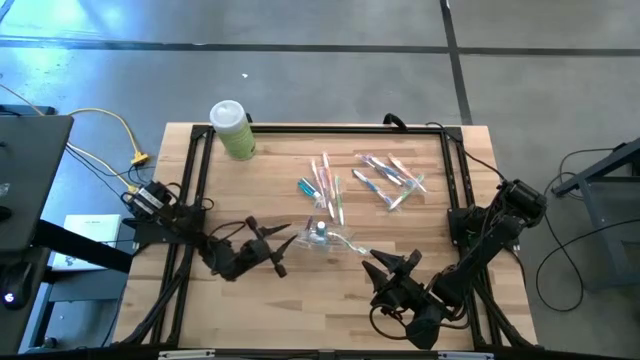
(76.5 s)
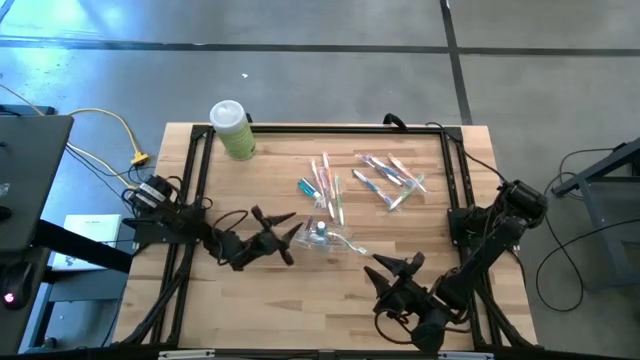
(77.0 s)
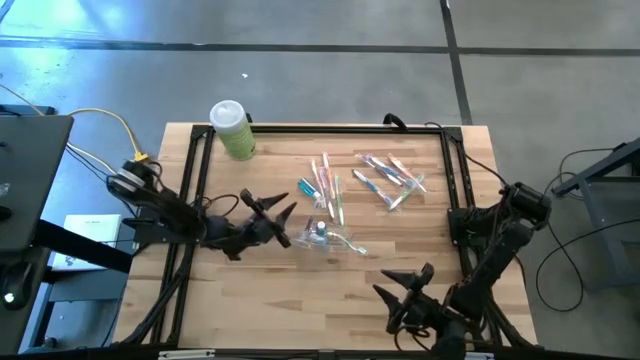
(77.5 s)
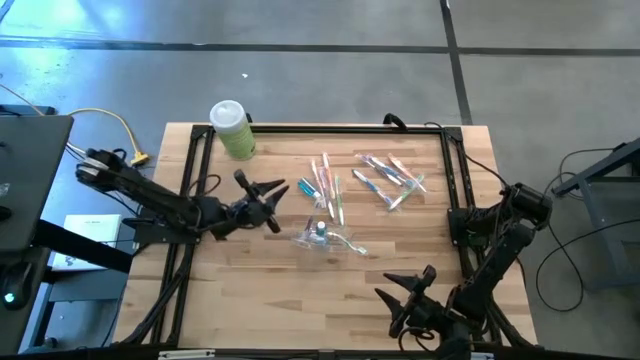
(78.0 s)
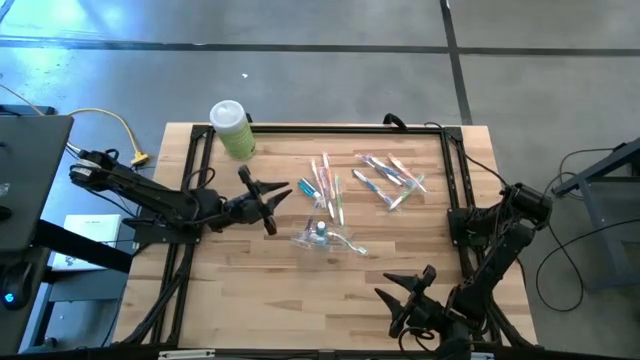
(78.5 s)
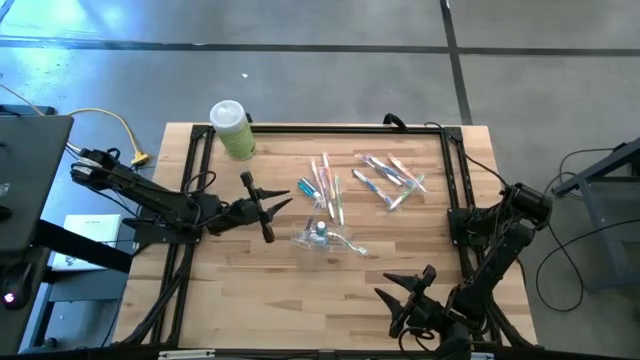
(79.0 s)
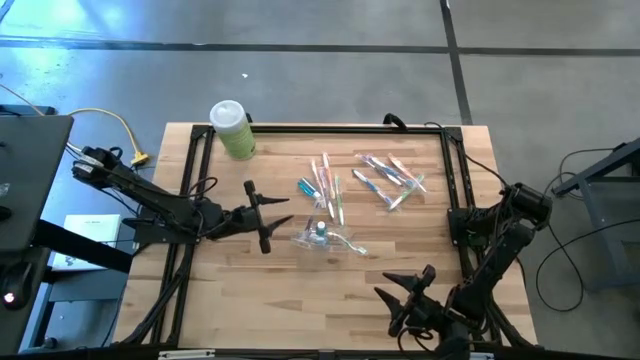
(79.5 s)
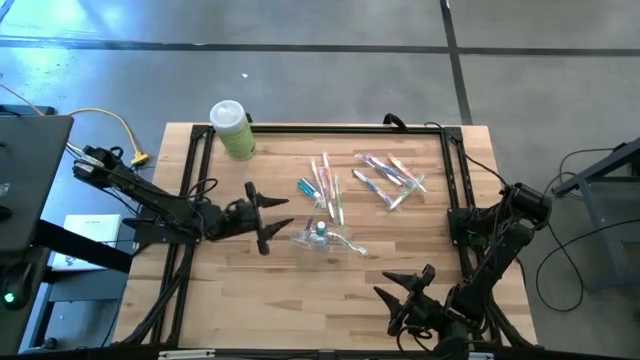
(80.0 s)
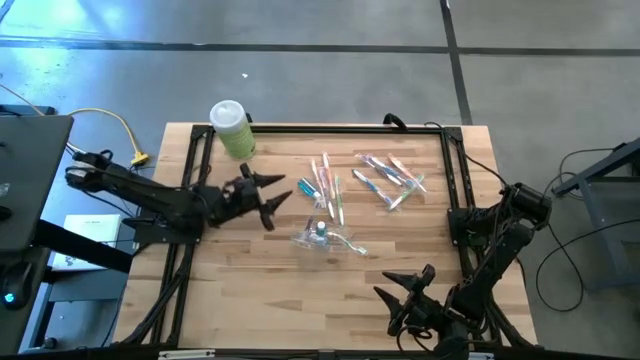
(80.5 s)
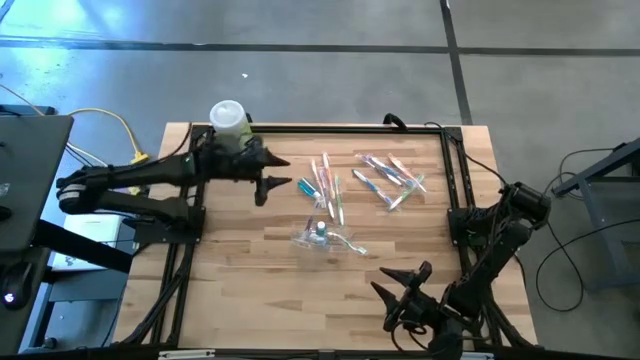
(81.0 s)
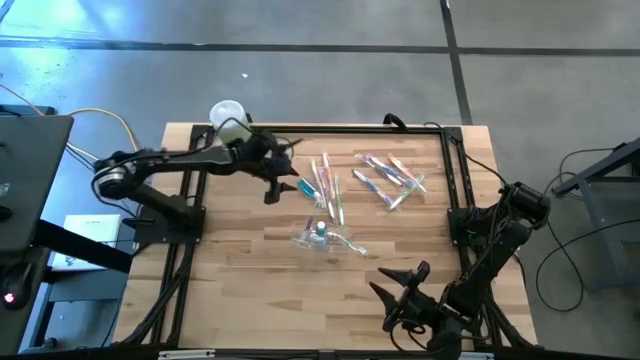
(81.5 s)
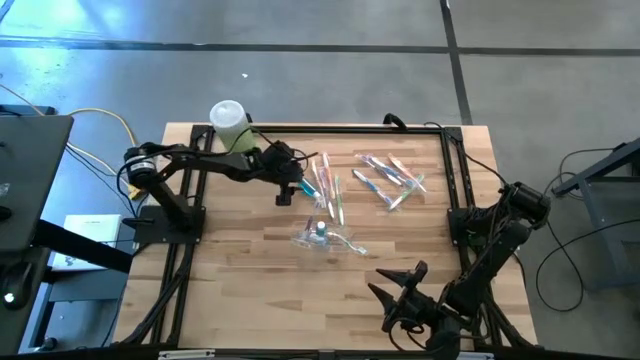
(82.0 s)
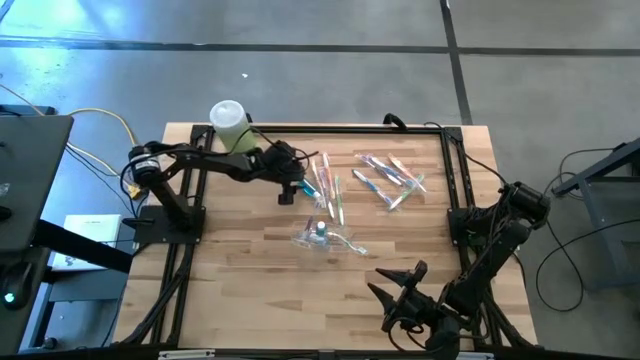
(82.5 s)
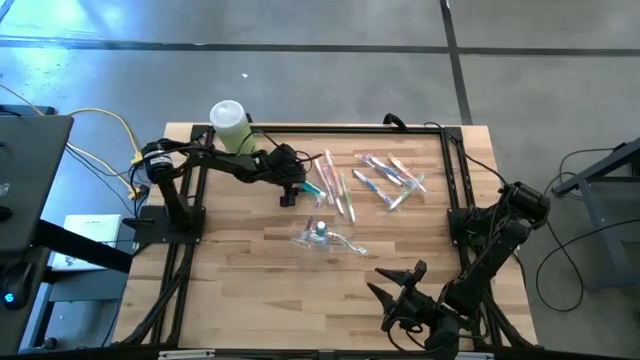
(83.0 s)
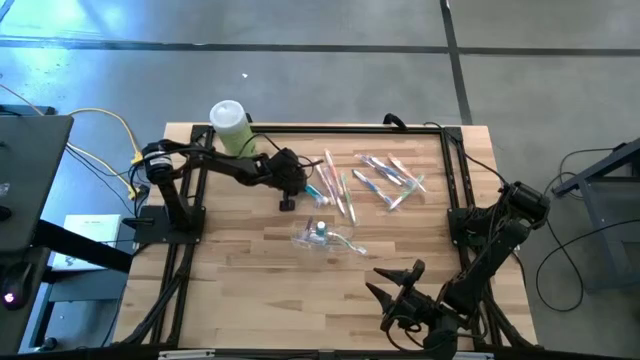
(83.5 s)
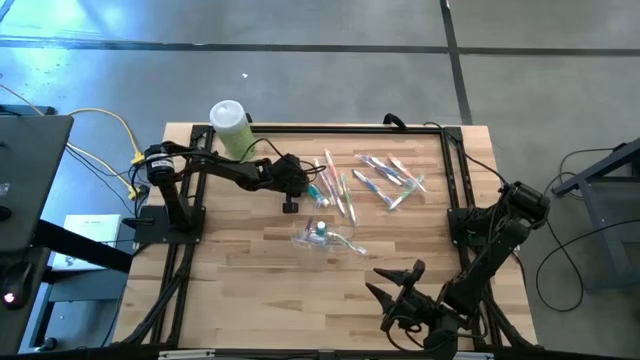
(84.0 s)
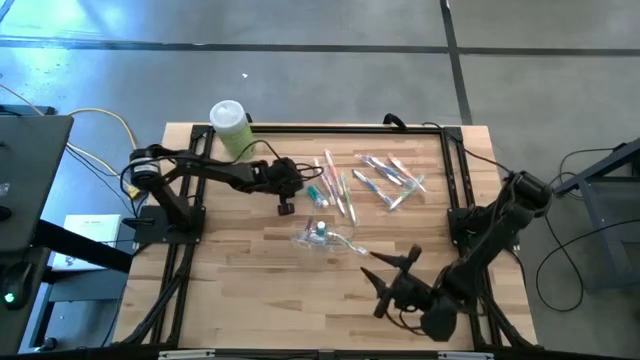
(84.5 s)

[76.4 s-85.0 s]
Task: Pick & Place toothbrushing station
Put the mouthwash into the transparent organizer

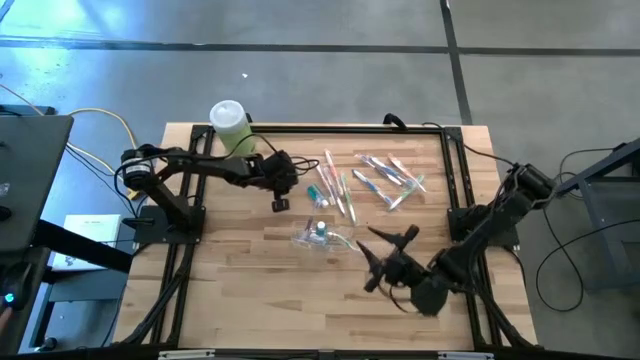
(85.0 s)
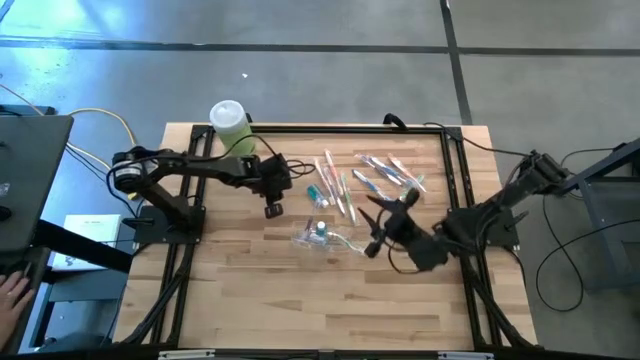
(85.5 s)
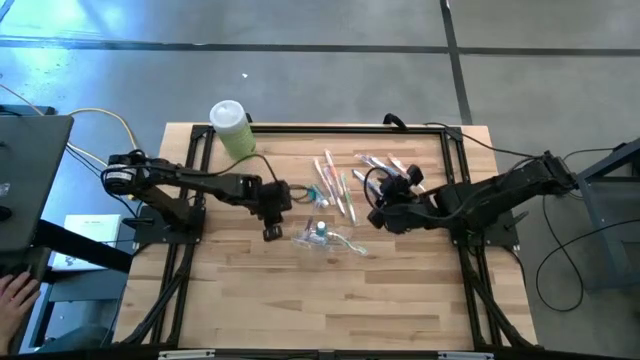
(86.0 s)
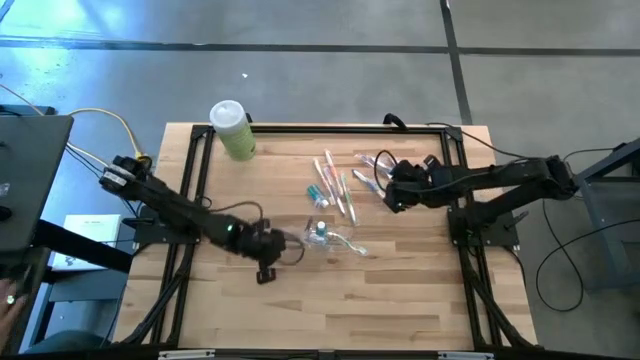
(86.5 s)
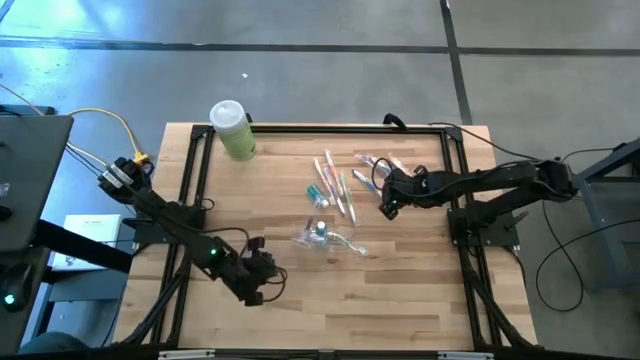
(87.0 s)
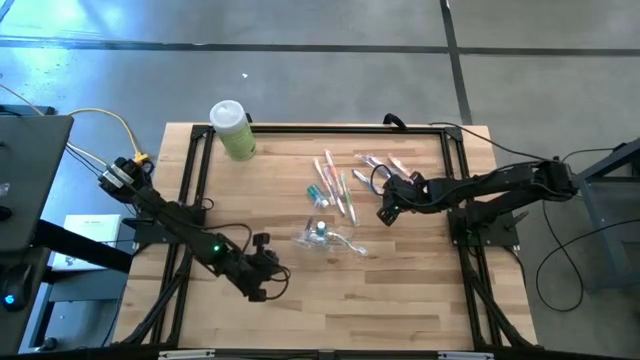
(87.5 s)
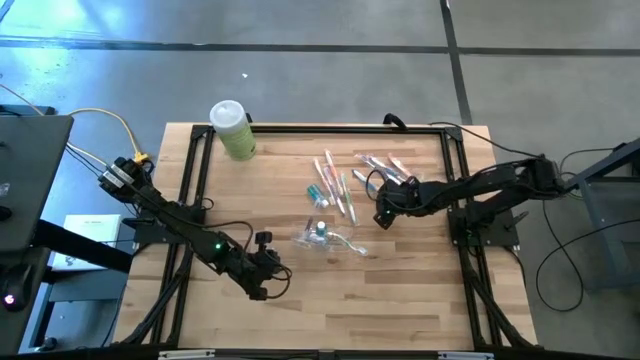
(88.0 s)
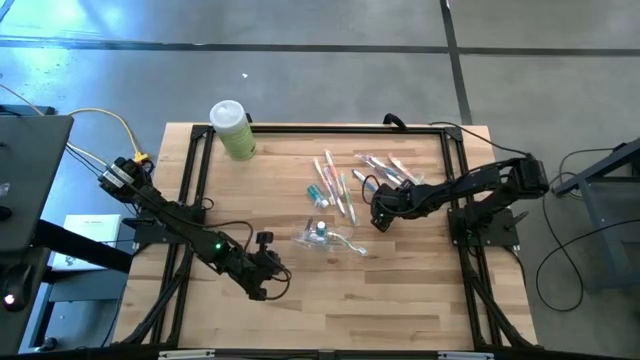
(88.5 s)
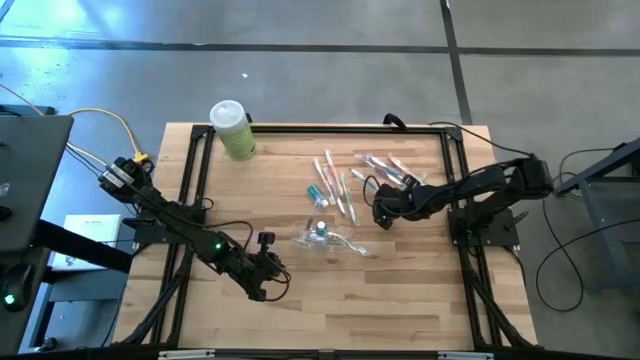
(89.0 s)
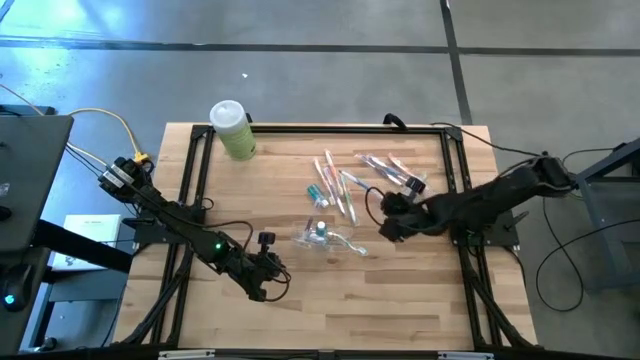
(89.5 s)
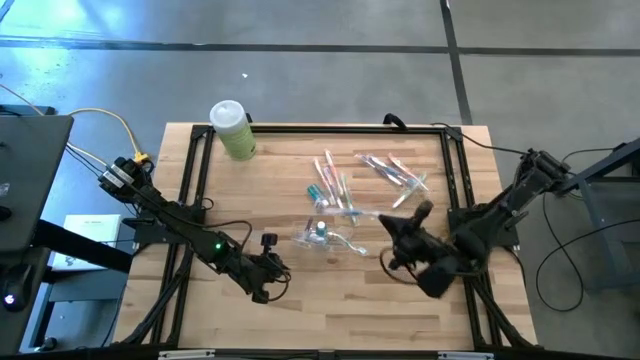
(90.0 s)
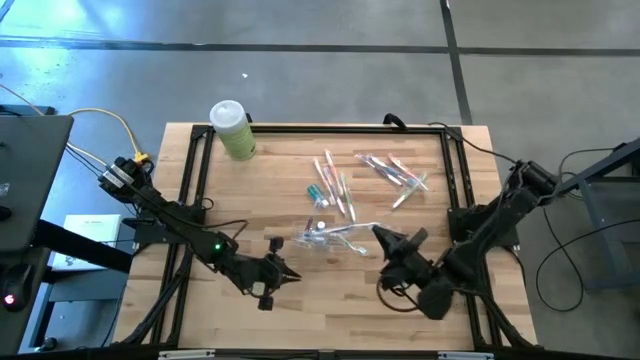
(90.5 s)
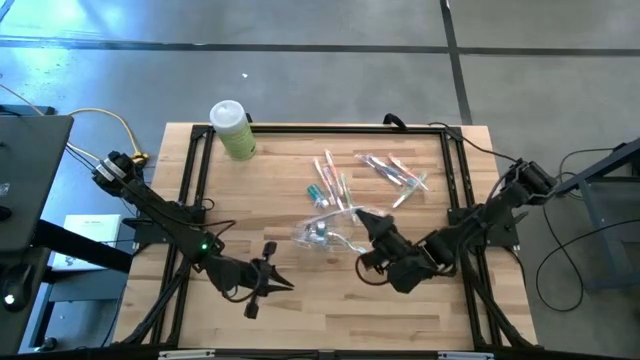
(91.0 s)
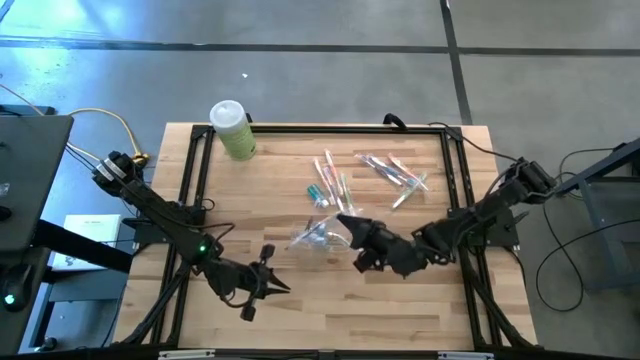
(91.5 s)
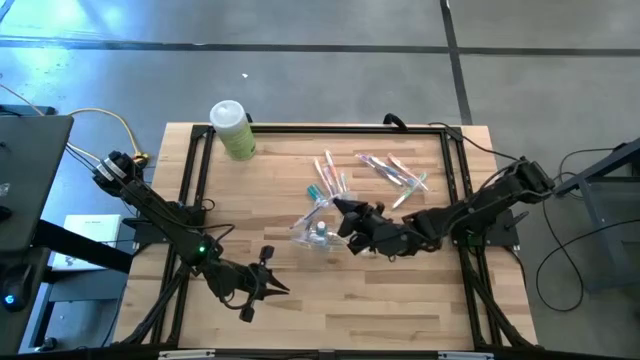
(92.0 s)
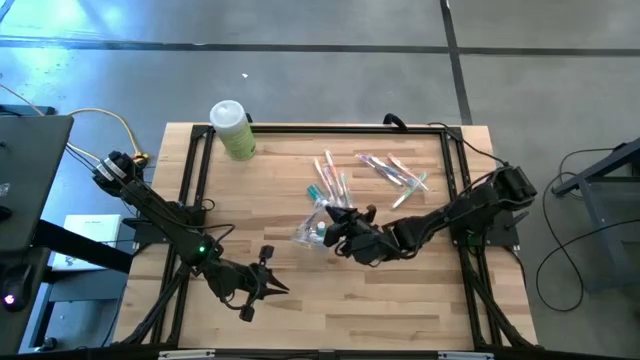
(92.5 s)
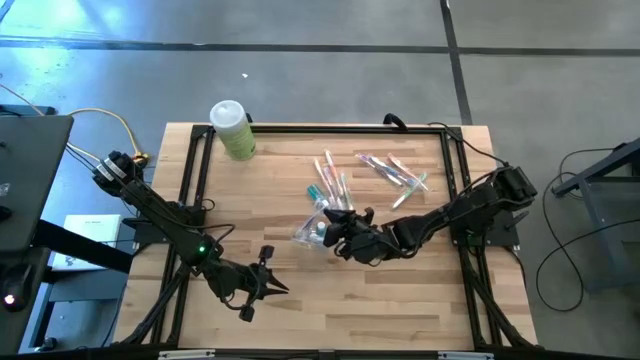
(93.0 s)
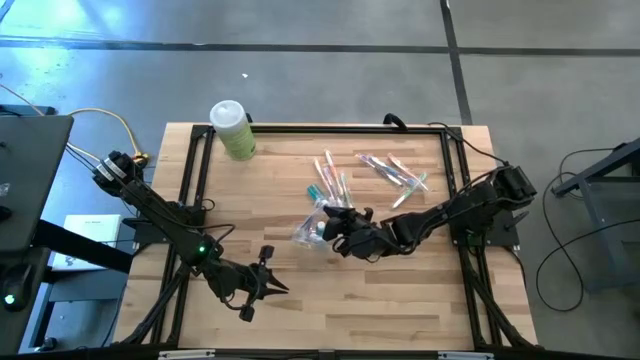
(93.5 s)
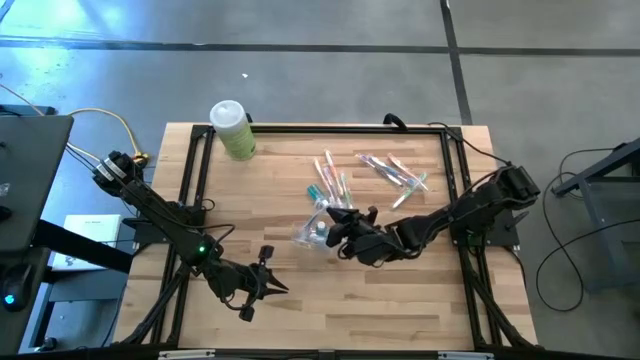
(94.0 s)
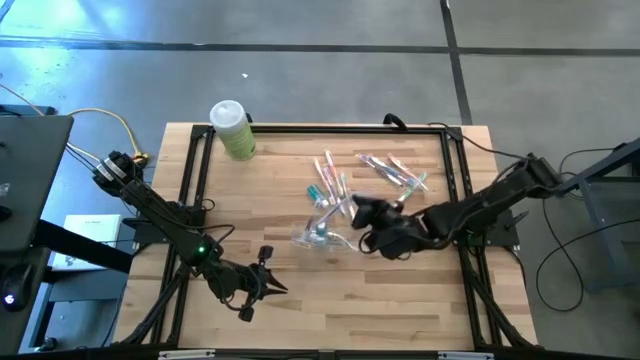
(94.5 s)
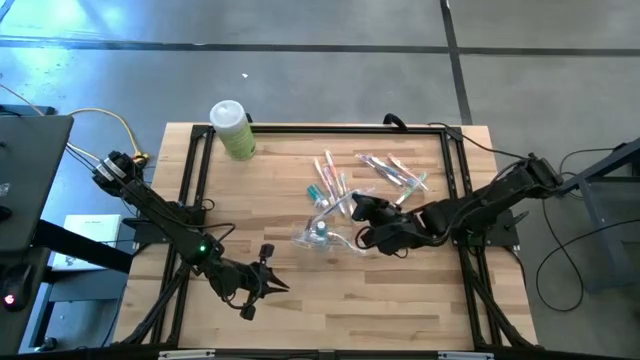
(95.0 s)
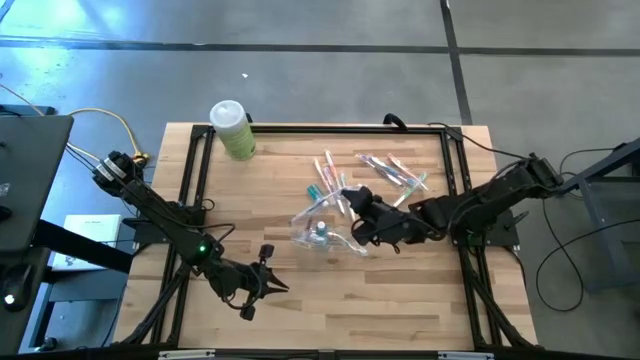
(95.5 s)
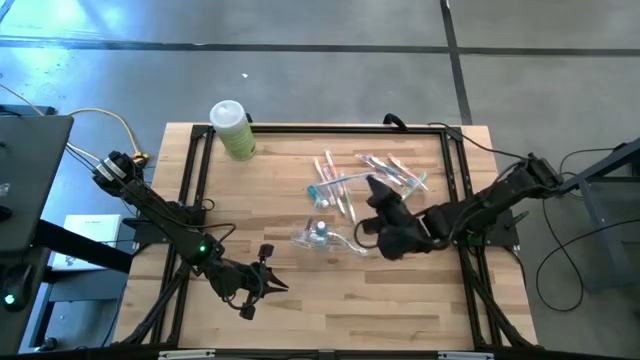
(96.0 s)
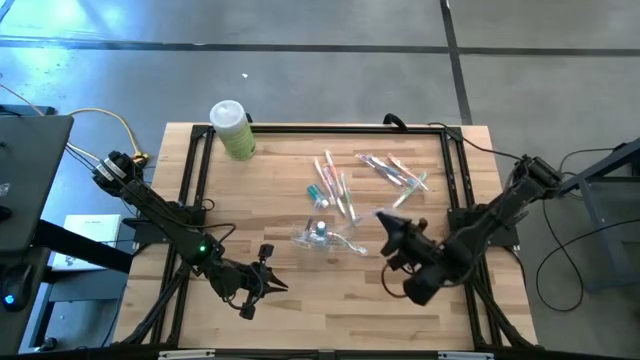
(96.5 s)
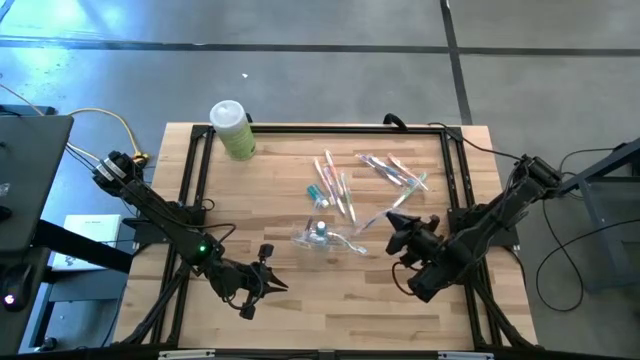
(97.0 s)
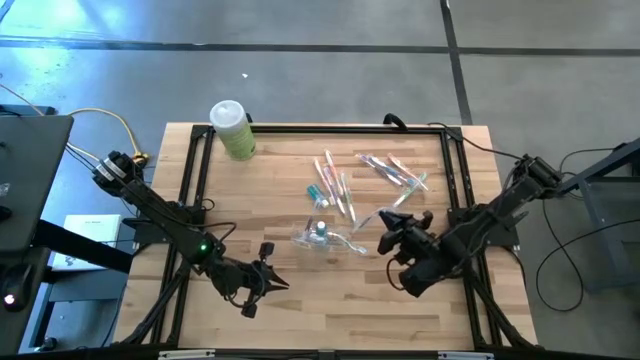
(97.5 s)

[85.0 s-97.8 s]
Put the blue toothbrush into the transparent organizer
